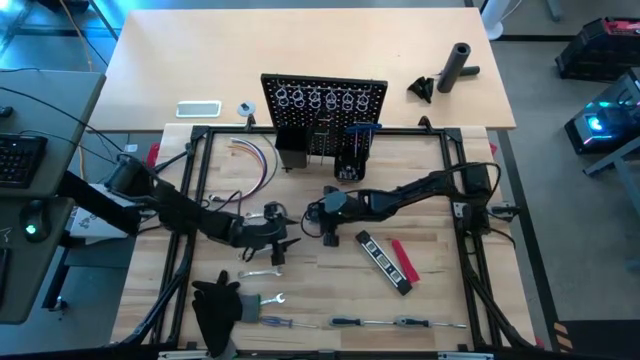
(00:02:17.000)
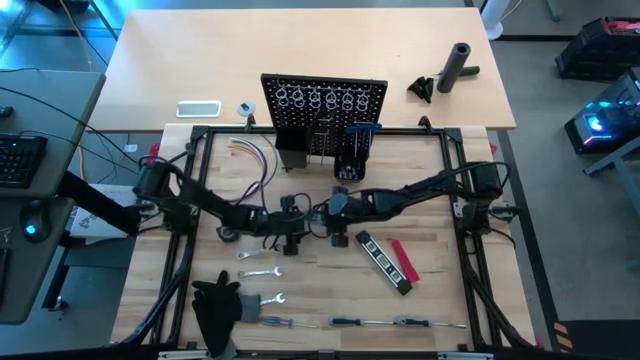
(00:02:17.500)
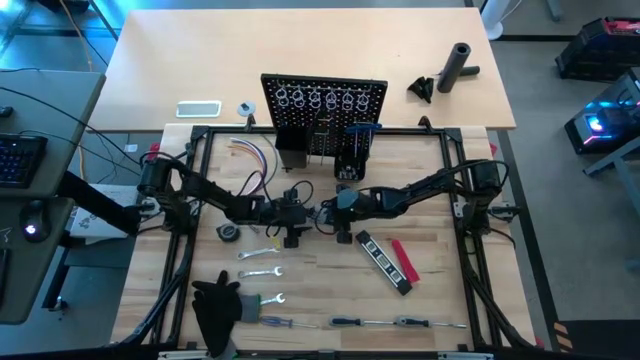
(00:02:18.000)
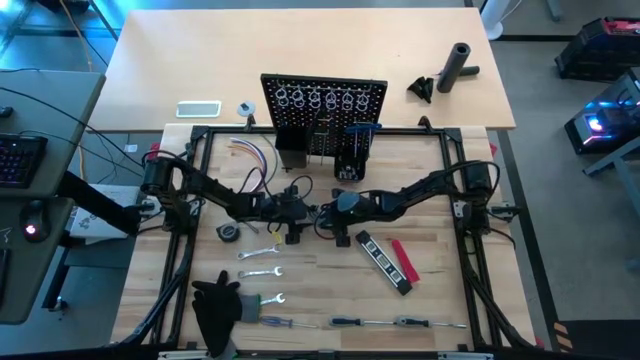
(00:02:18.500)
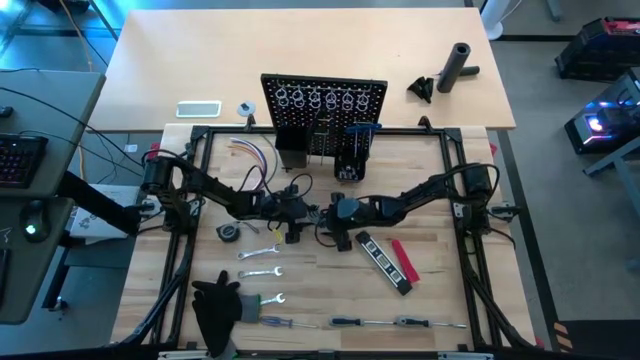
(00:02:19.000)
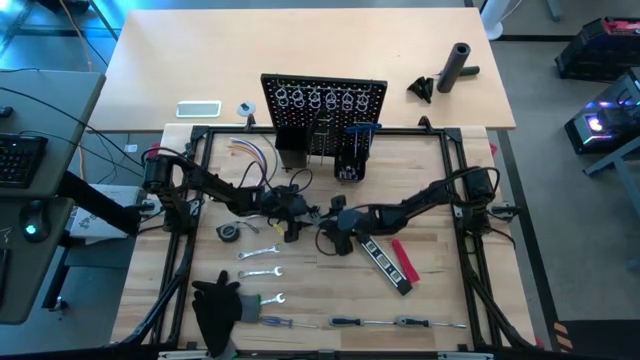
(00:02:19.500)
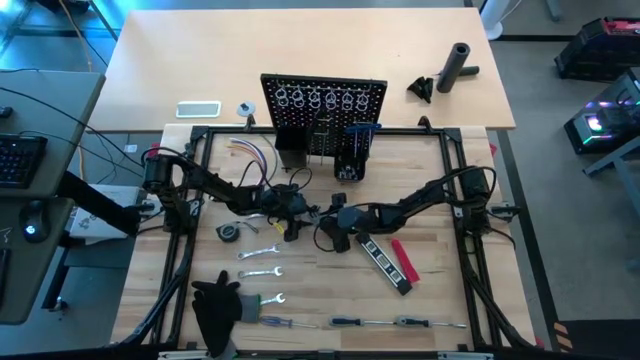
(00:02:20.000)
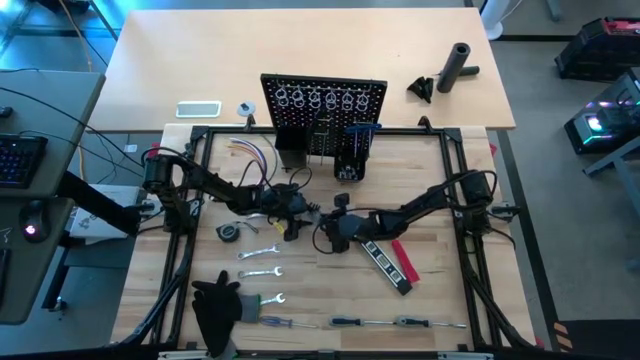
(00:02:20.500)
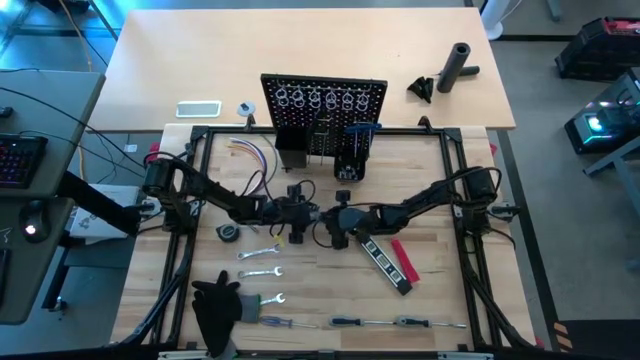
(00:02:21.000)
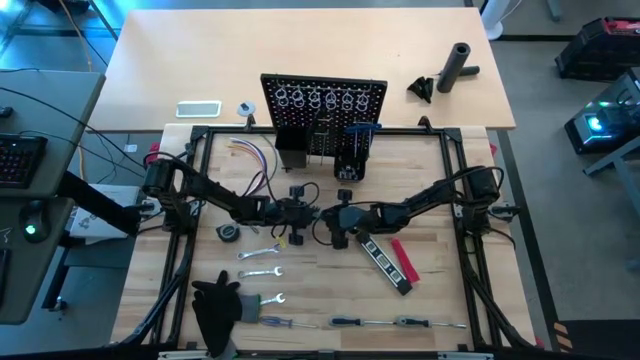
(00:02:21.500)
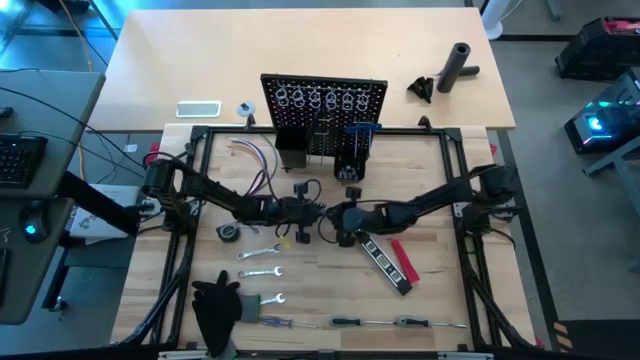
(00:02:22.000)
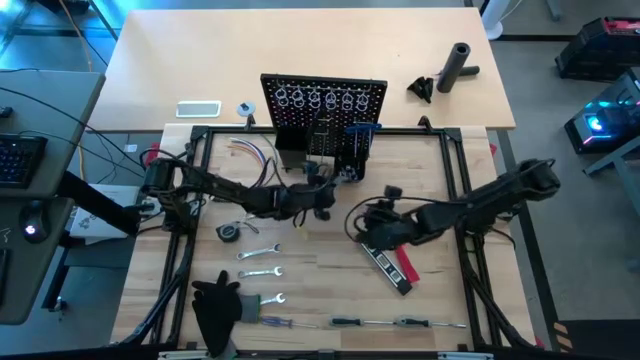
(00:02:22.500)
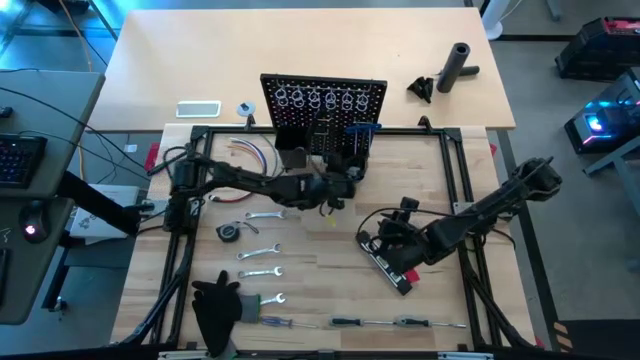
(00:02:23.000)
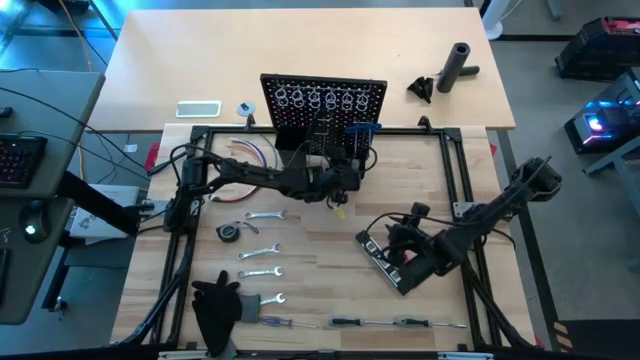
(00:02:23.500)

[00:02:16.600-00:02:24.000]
Task: Hang tools onto peg board
Put the allen key holder into the small black bin on the black pegboard

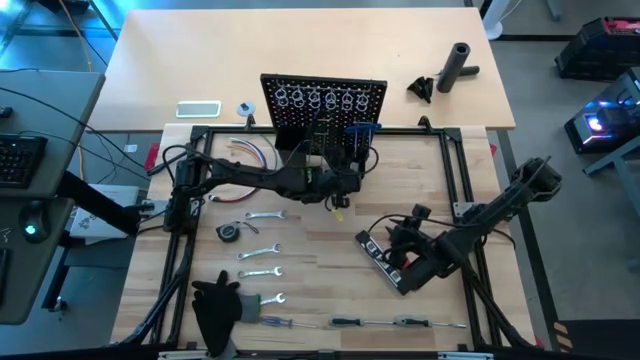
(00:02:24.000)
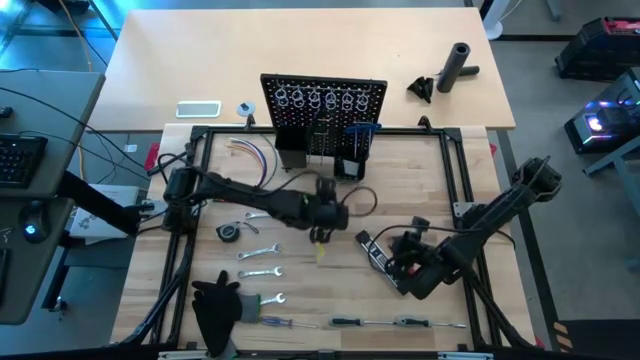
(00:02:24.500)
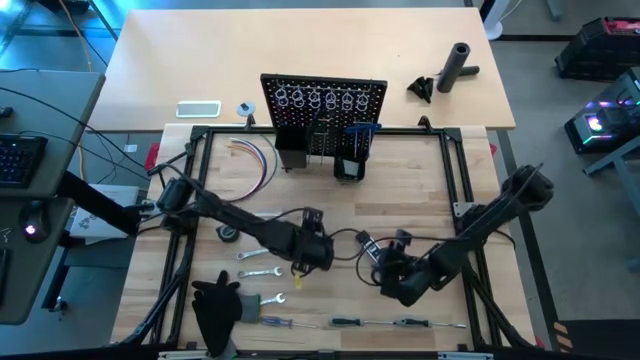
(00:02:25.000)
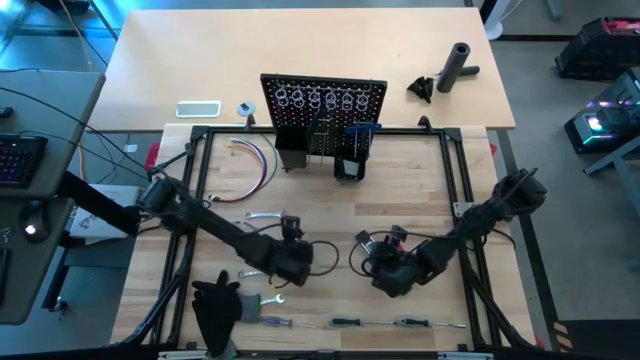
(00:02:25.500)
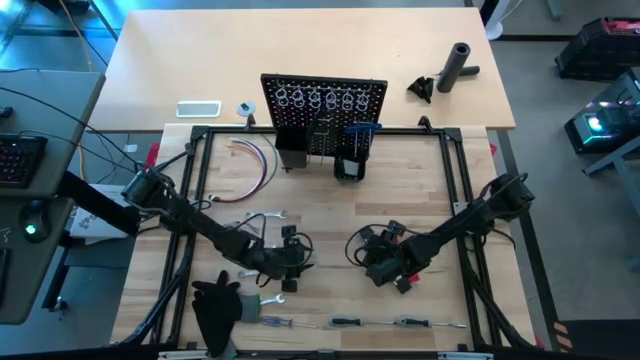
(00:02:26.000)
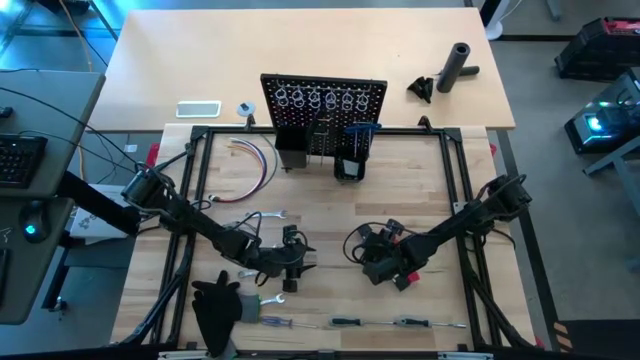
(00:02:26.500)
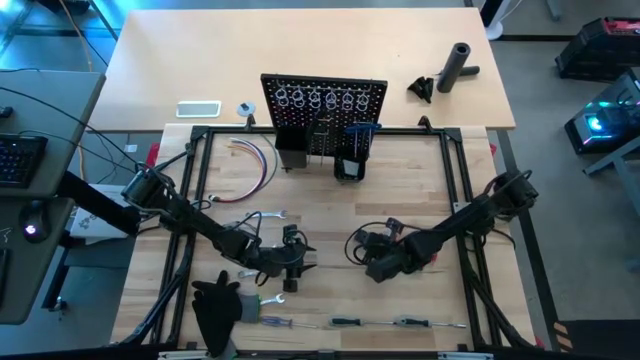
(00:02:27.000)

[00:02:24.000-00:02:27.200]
Put the black spirit level into the big black bin on the black pegboard

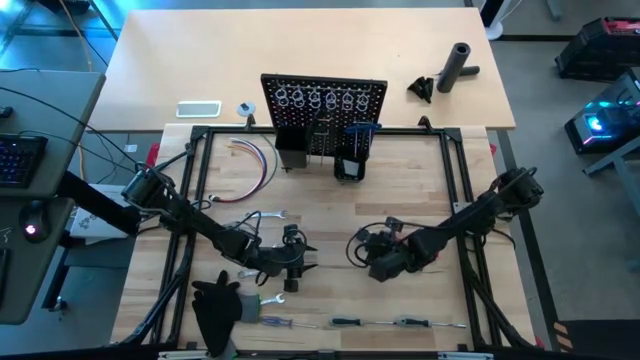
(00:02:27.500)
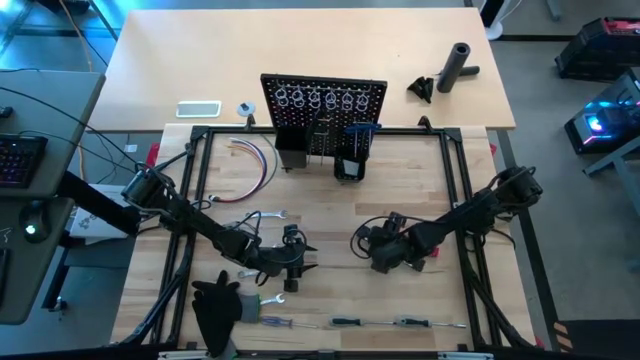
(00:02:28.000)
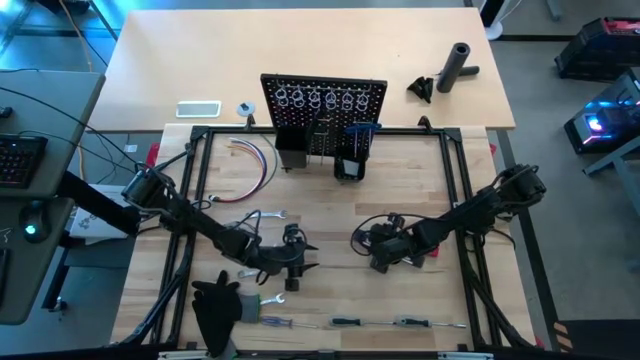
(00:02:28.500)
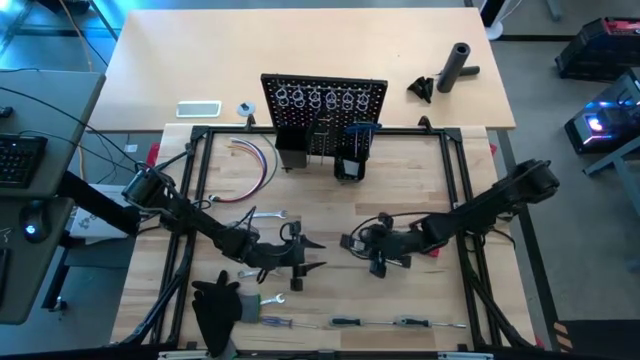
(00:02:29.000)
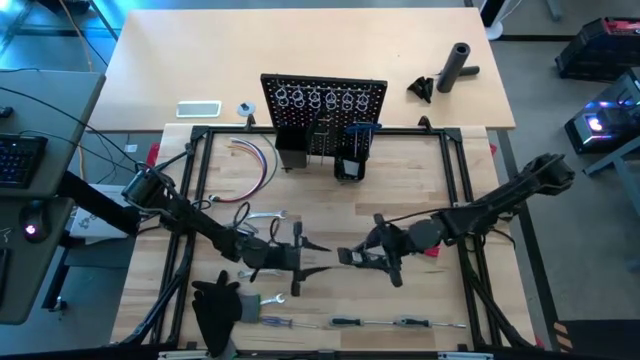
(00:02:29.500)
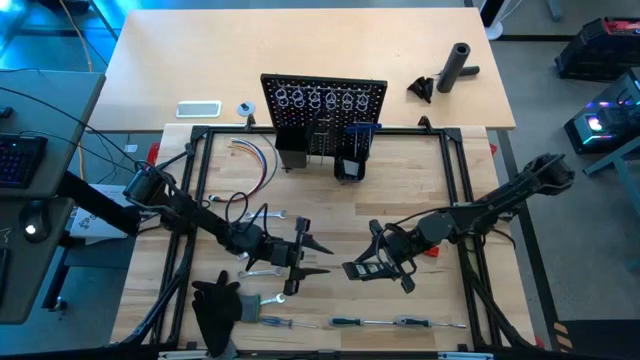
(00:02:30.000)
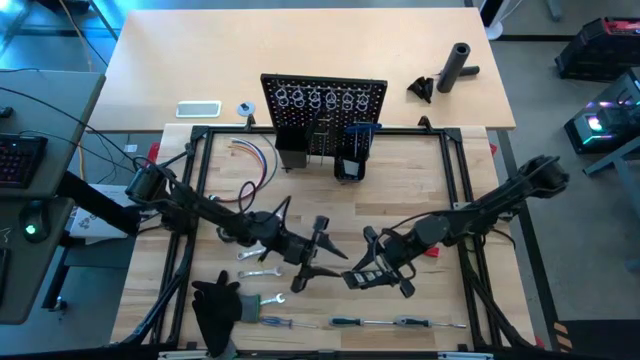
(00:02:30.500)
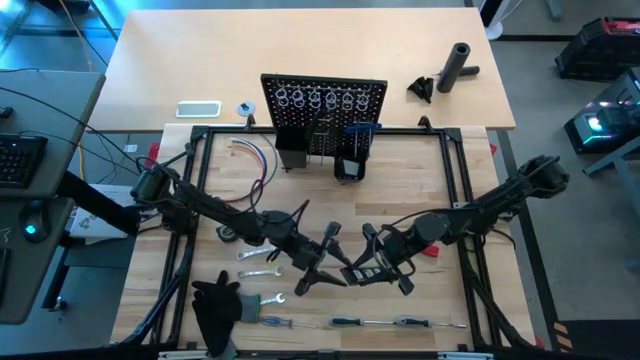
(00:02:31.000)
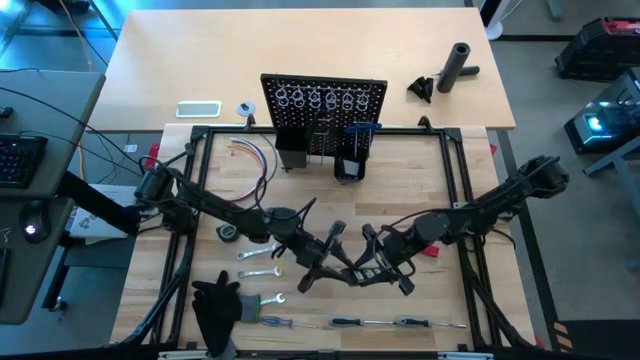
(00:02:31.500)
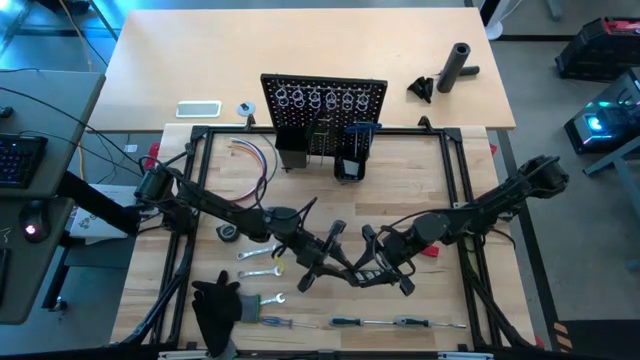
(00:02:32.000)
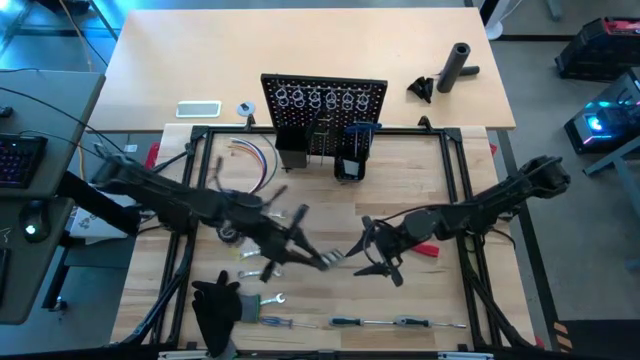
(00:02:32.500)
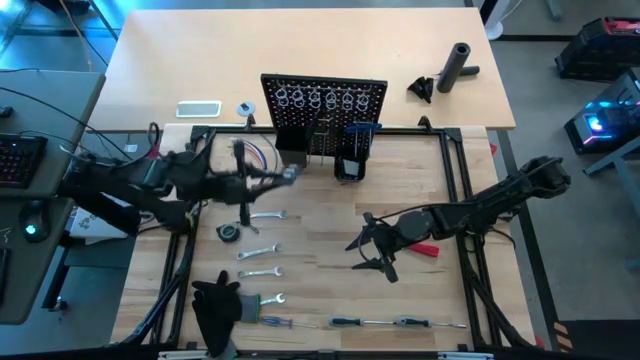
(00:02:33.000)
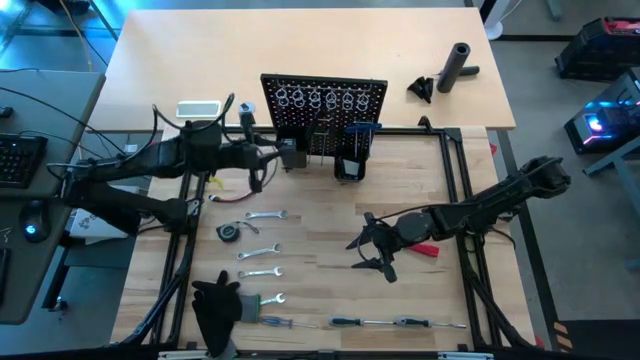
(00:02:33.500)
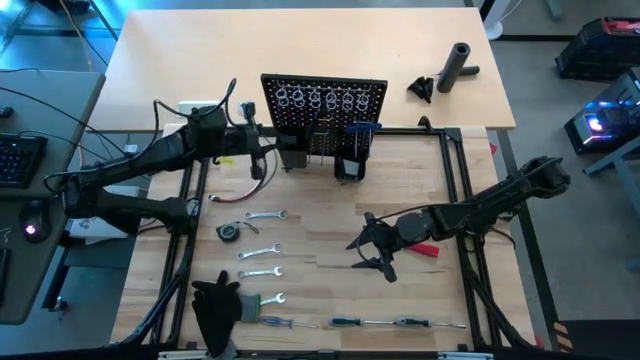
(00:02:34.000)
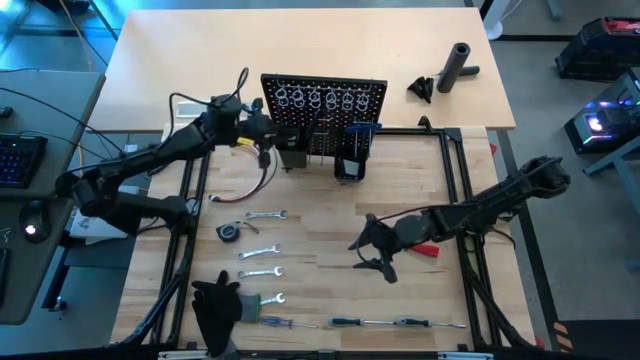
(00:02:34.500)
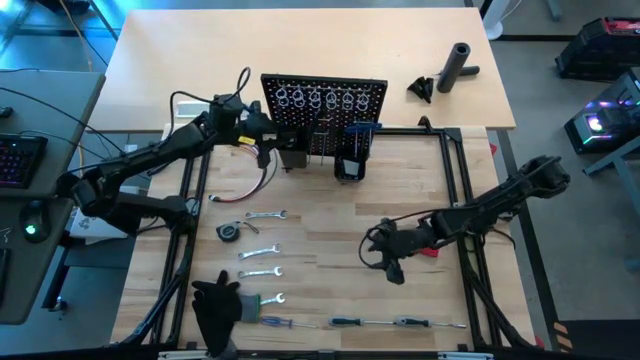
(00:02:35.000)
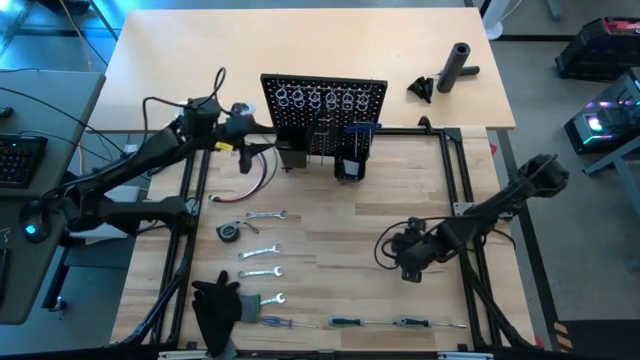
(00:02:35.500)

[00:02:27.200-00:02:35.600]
Put the black spirit level into the big black bin on the black pegboard

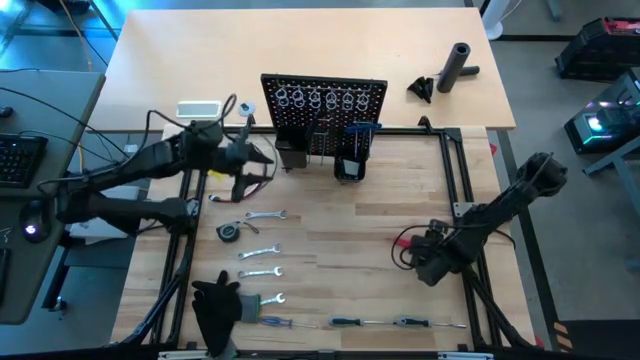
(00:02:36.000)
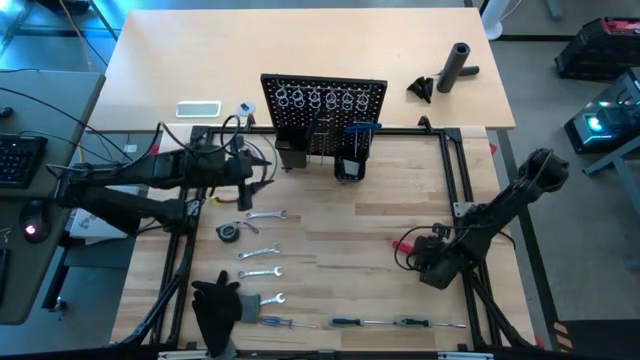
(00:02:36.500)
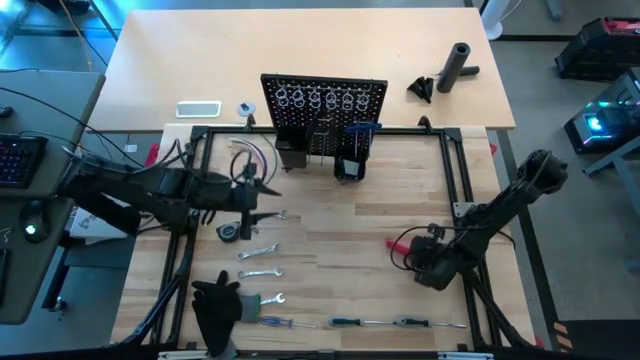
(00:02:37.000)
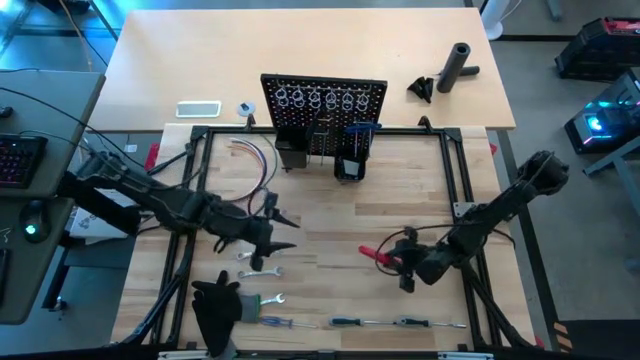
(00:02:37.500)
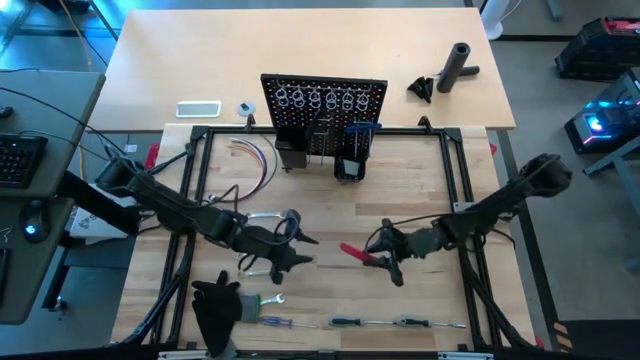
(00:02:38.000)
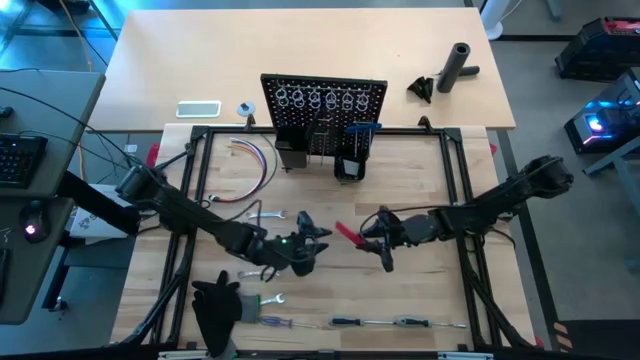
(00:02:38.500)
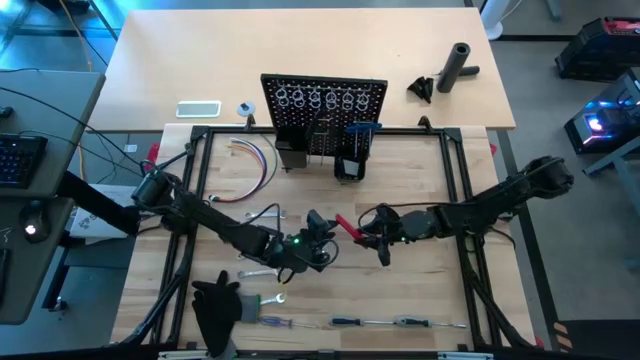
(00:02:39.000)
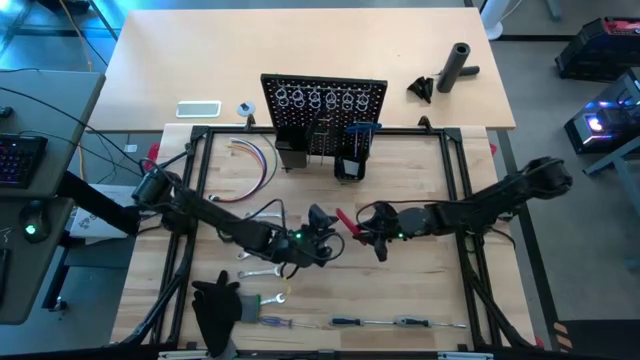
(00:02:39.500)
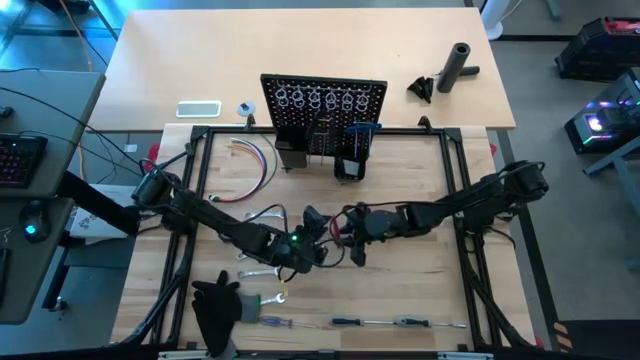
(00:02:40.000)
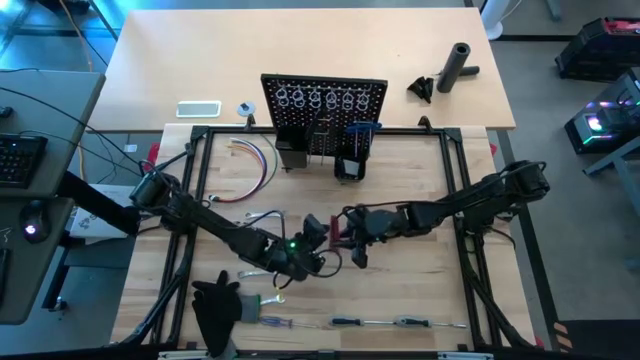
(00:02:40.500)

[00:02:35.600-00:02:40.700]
Put the red cutter into the big black bin on the black pegboard
